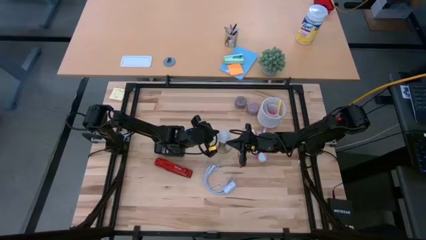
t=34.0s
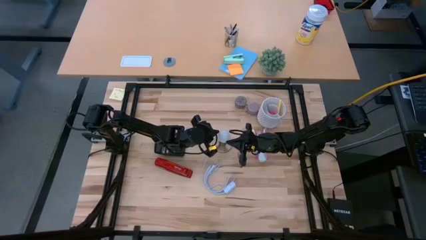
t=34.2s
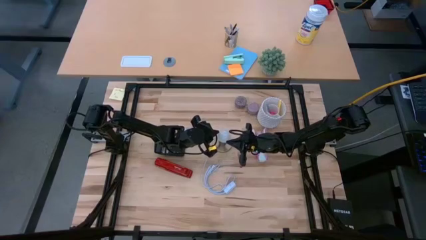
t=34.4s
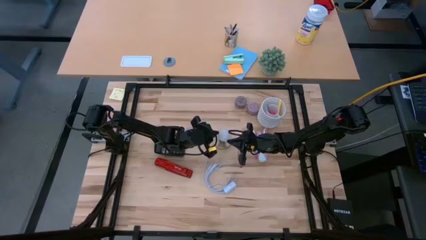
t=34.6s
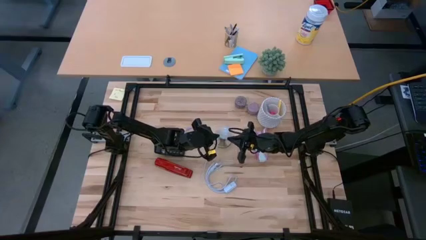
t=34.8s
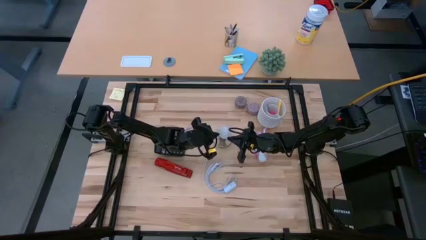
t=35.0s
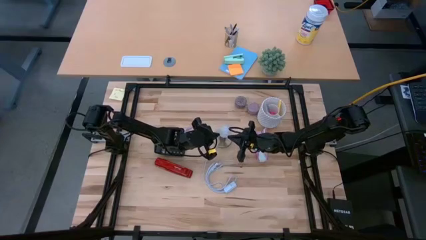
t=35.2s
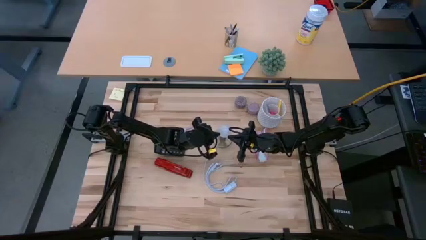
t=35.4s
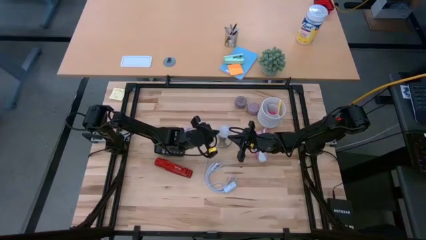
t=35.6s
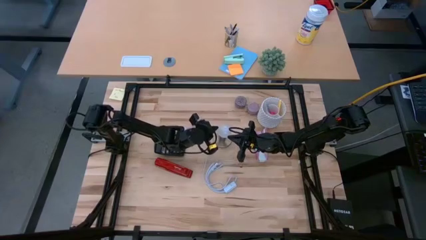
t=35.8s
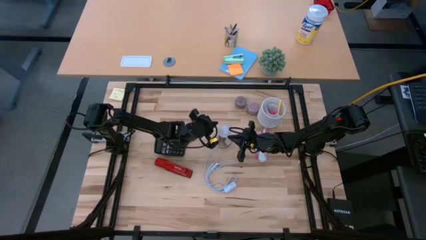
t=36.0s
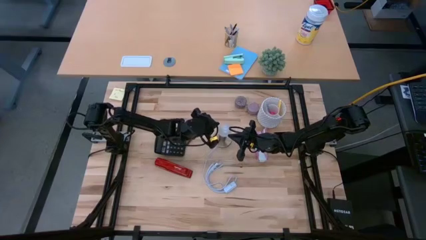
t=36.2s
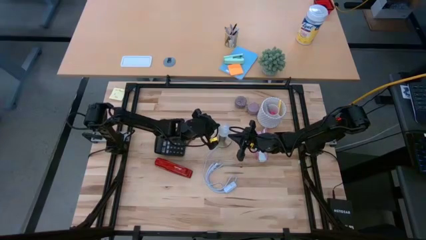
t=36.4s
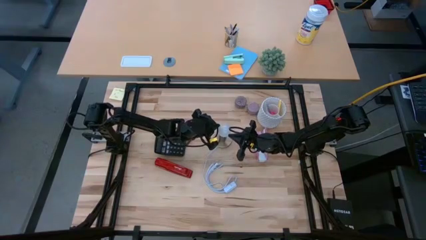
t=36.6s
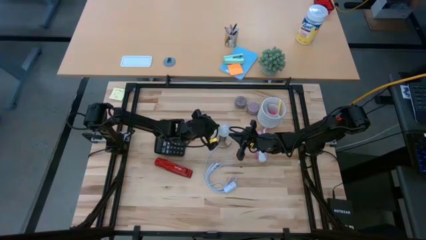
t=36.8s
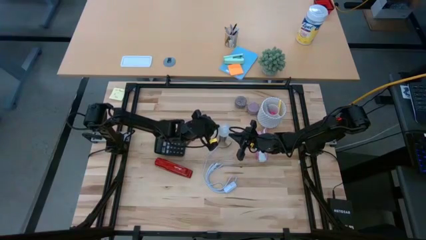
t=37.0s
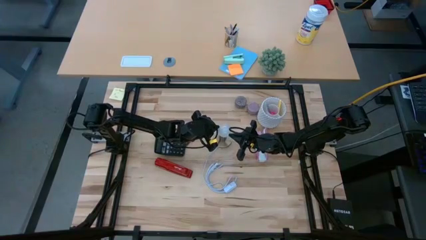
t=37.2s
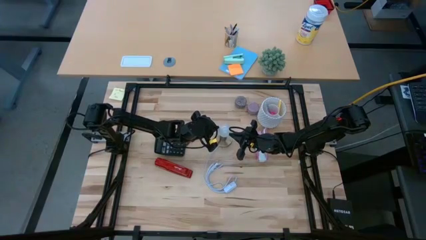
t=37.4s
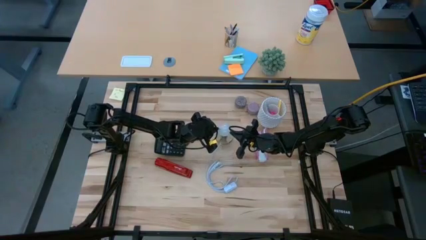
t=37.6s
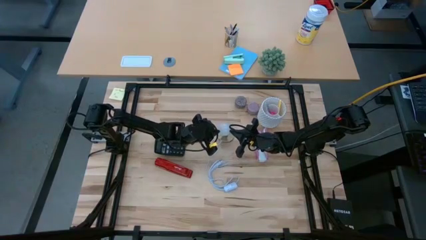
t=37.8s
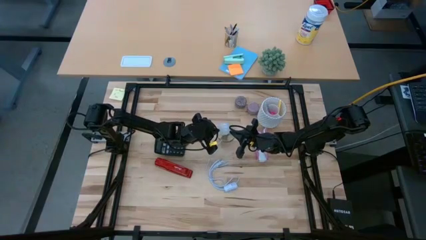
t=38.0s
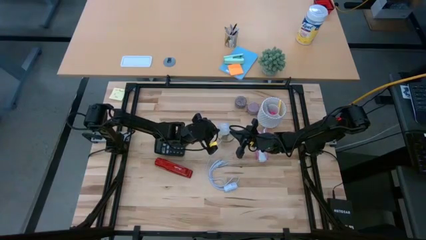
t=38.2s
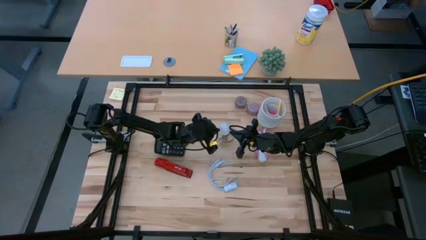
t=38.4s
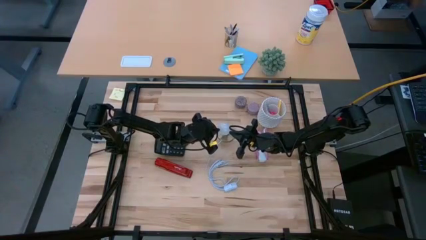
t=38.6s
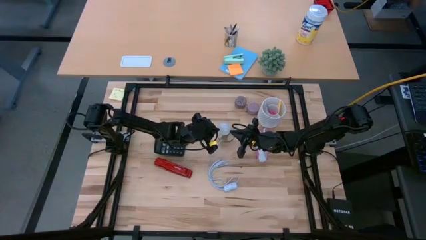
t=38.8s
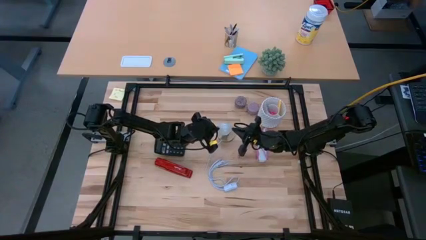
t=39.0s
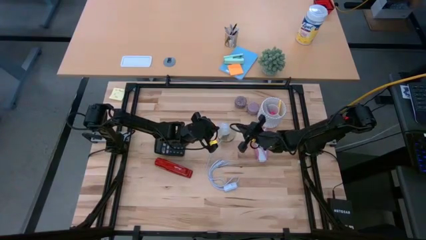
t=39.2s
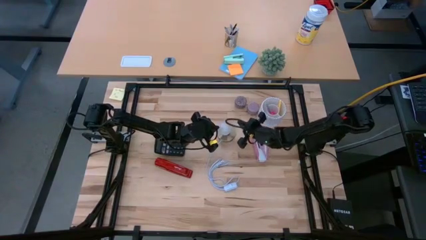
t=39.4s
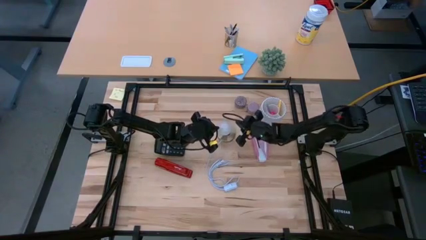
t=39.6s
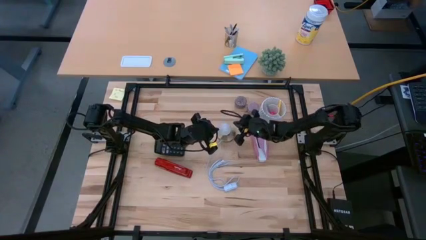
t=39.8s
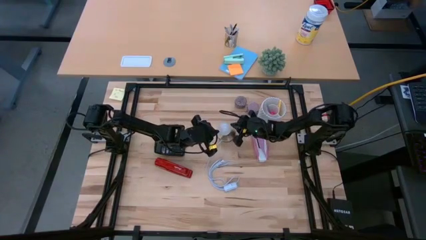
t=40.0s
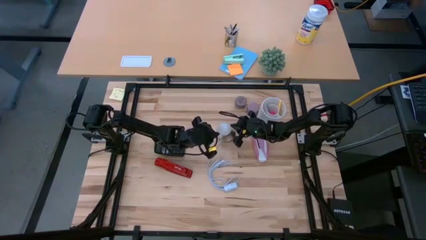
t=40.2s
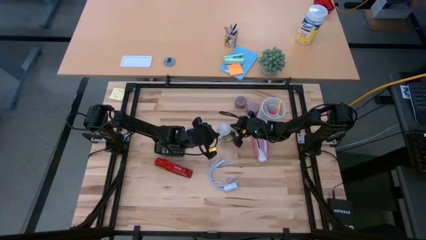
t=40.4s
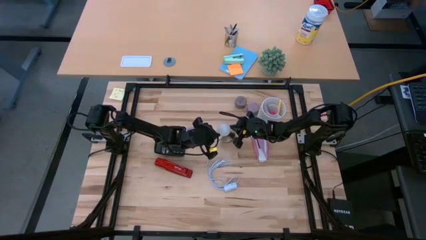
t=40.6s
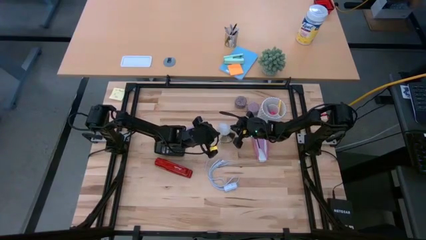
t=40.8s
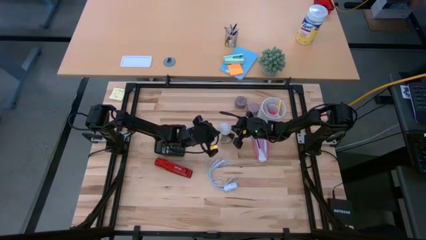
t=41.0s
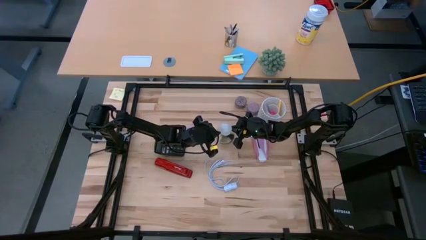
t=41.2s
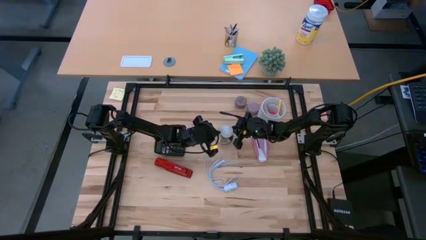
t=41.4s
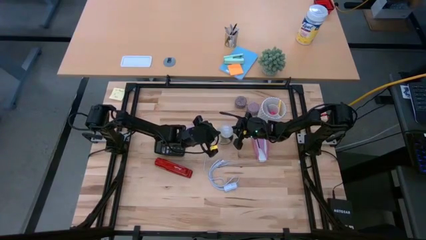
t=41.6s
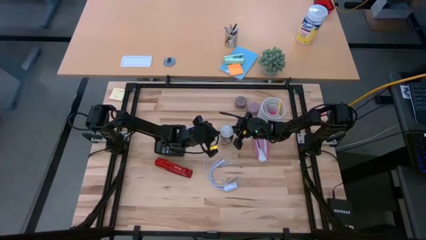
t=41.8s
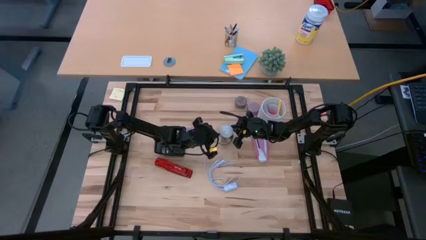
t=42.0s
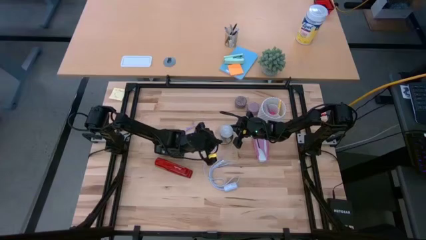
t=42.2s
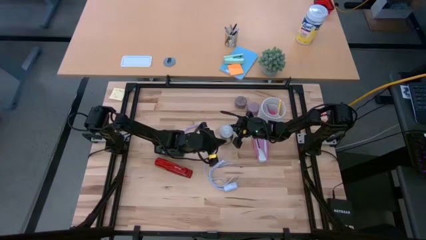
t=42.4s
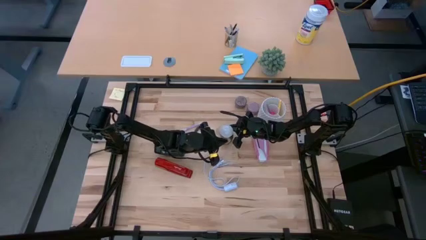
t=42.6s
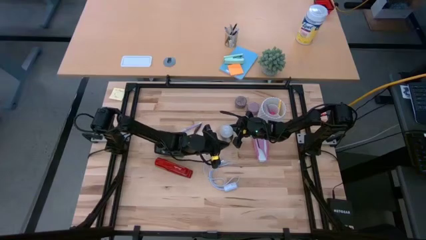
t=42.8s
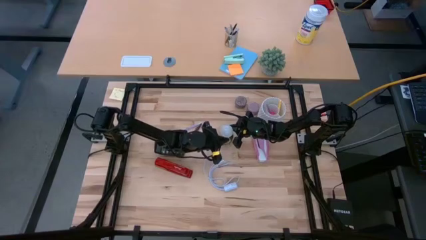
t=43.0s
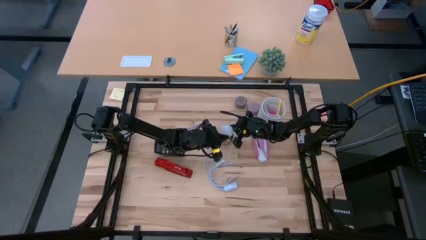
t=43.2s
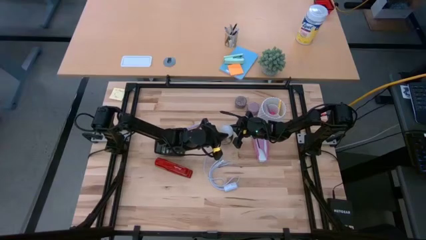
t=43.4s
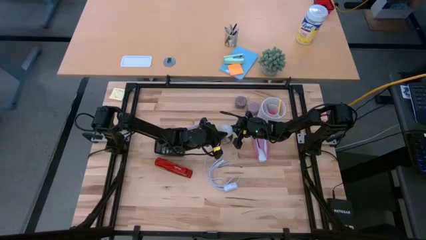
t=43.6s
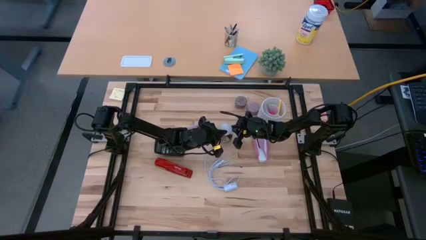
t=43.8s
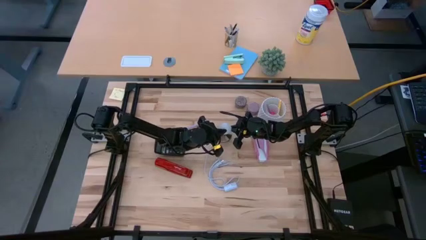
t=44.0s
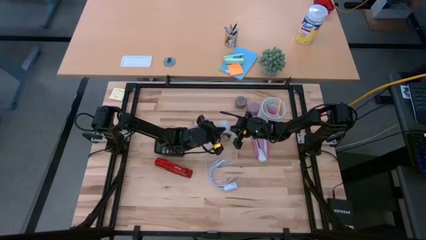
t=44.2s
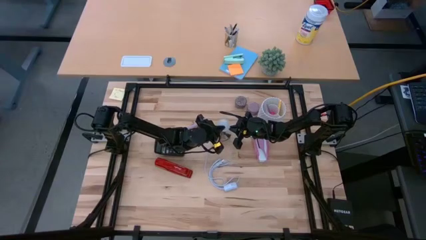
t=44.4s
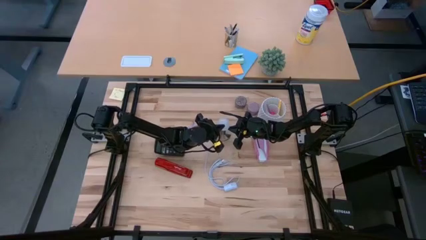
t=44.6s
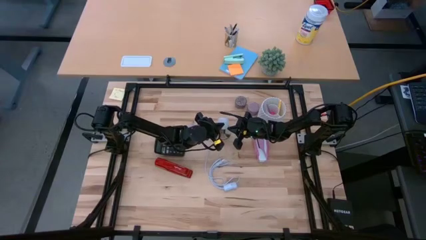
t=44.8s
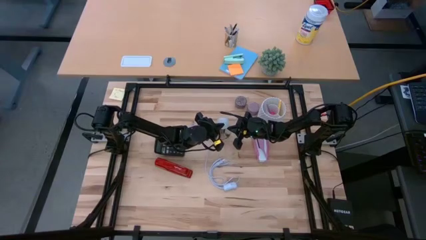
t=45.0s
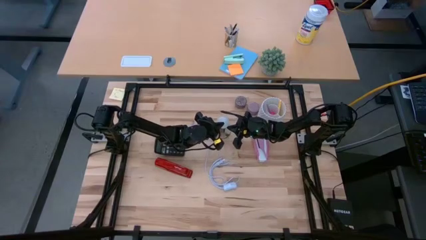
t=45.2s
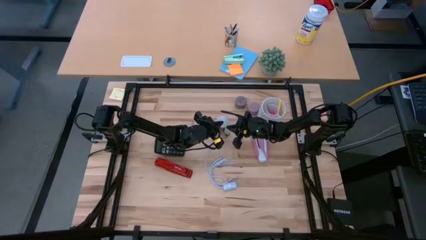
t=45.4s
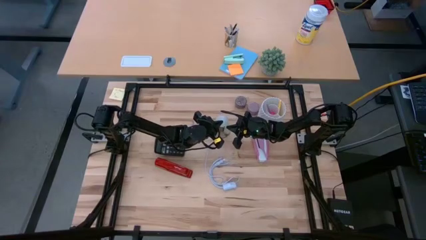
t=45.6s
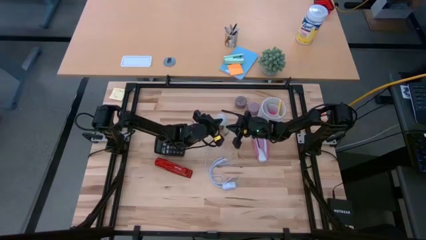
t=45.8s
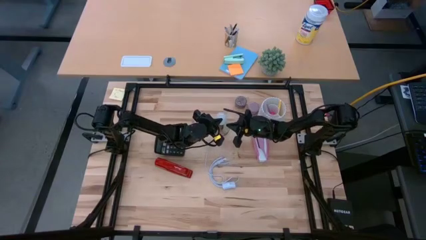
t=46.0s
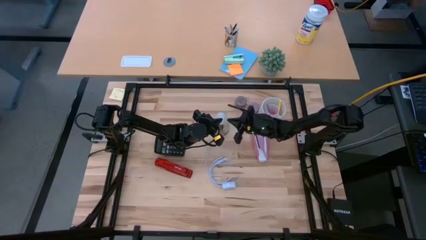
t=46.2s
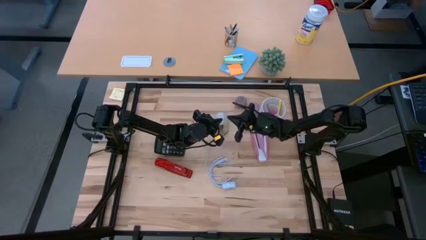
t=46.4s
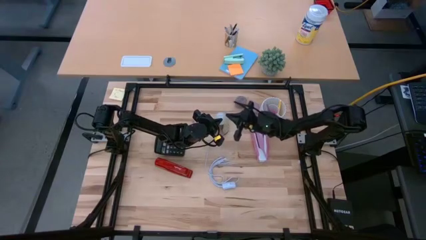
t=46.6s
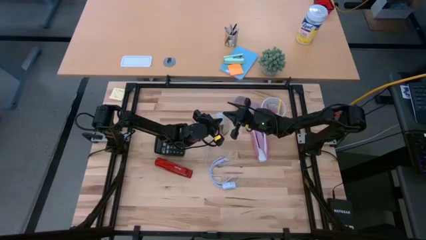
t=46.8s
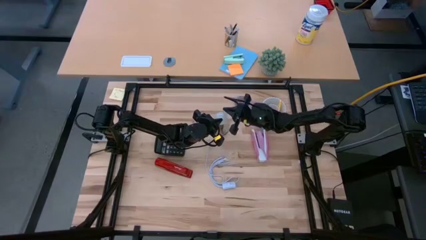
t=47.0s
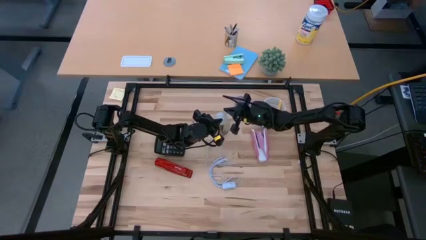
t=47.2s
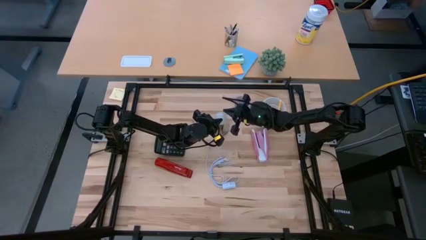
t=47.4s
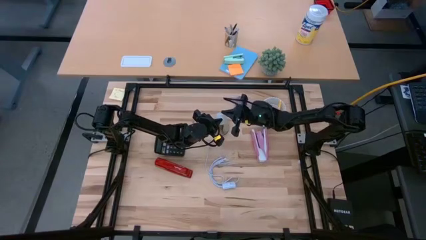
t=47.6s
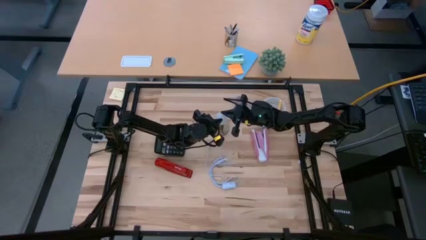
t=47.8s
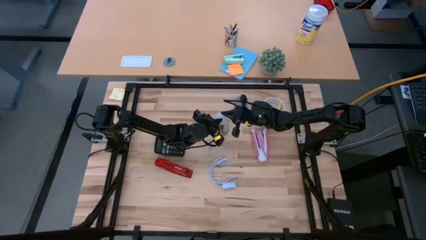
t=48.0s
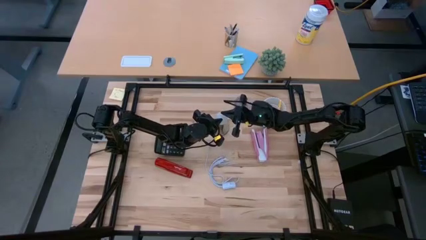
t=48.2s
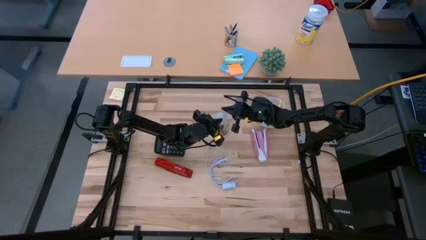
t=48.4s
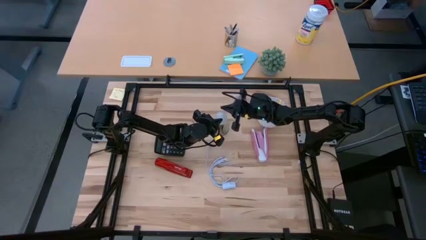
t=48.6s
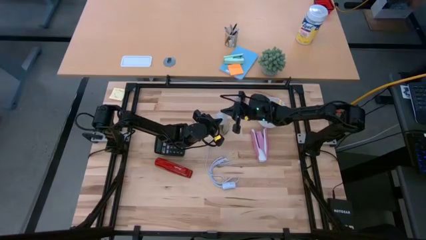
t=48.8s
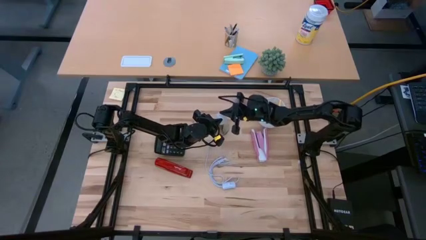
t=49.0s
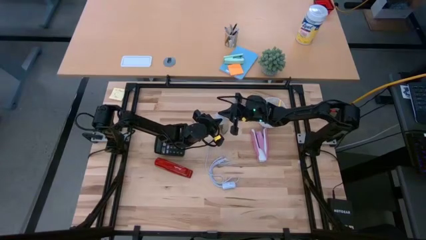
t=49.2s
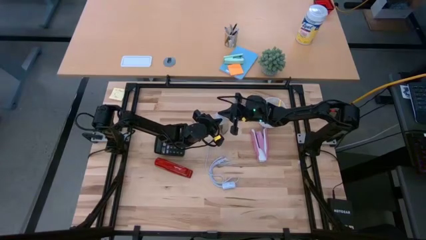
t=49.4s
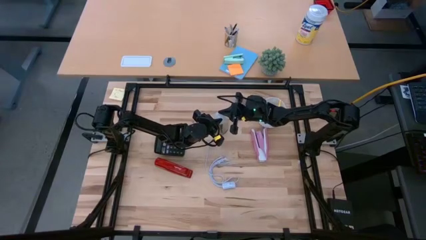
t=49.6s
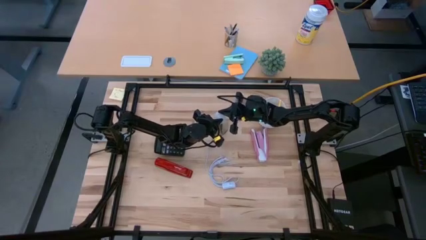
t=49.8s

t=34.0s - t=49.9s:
Task: Screw lightbulb
Insert the white lightbulb into the golden lamp
